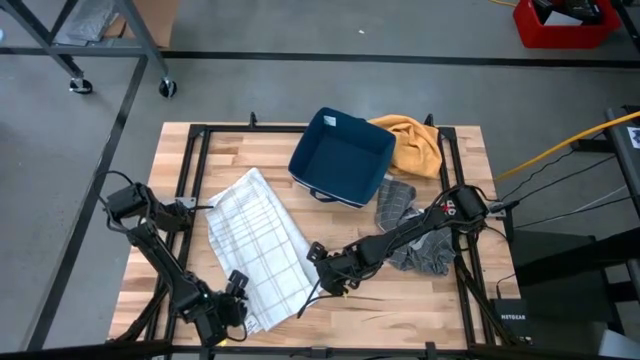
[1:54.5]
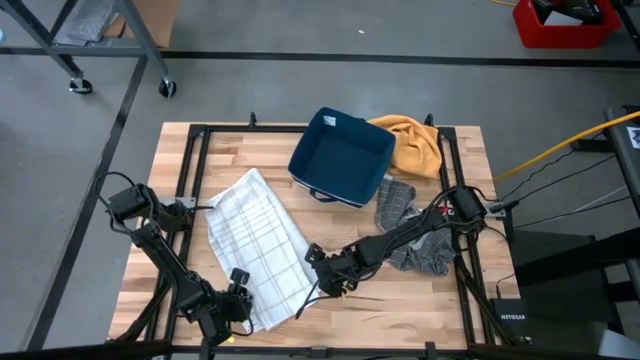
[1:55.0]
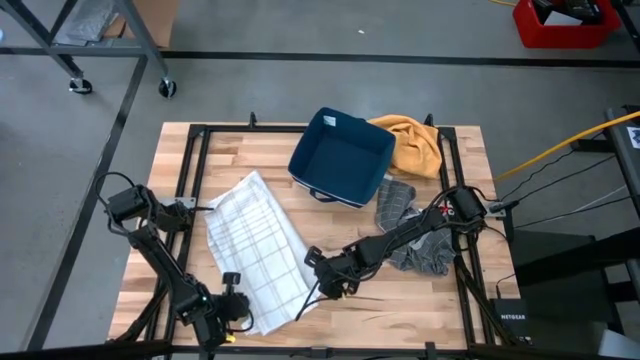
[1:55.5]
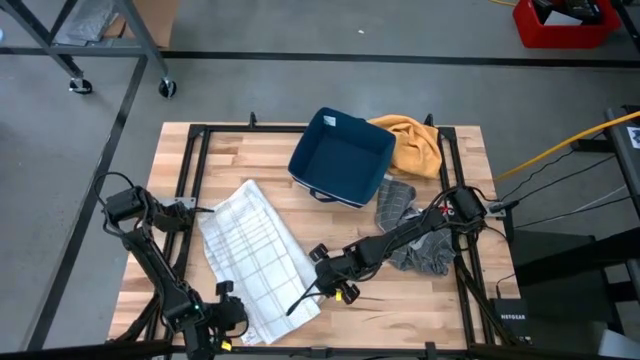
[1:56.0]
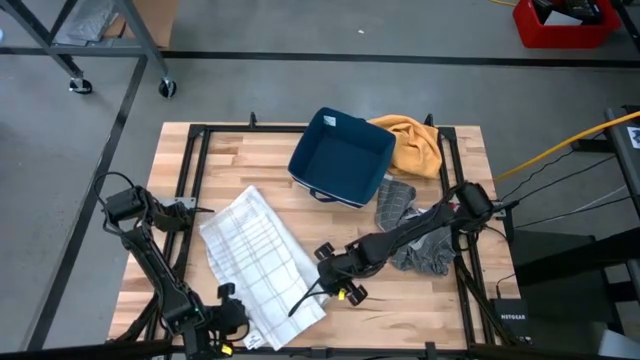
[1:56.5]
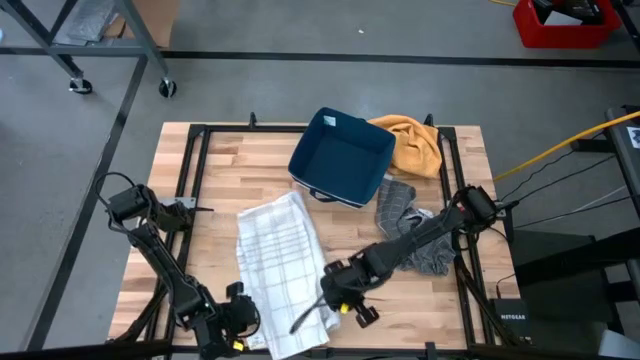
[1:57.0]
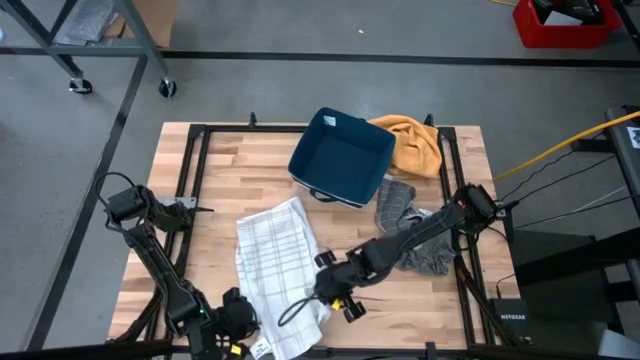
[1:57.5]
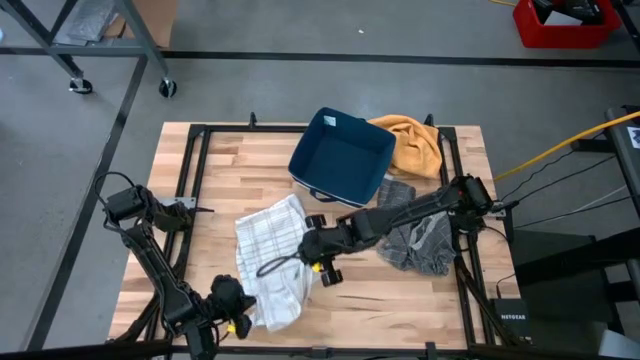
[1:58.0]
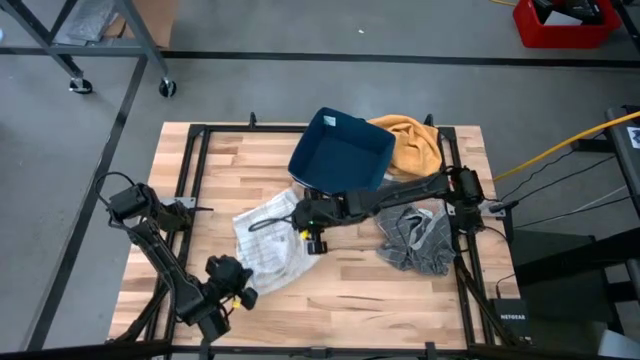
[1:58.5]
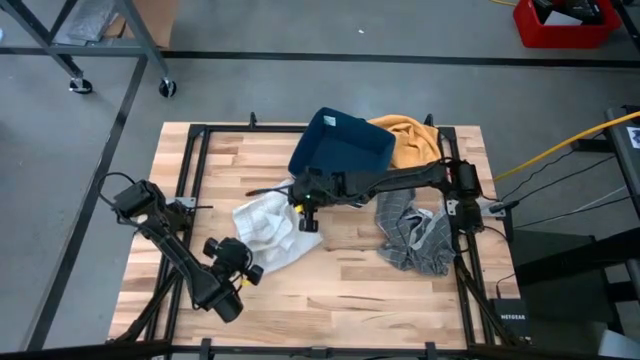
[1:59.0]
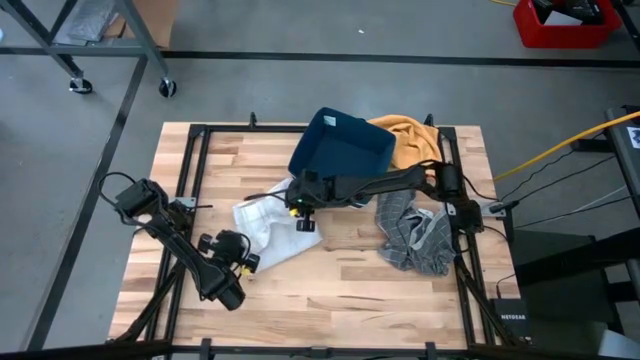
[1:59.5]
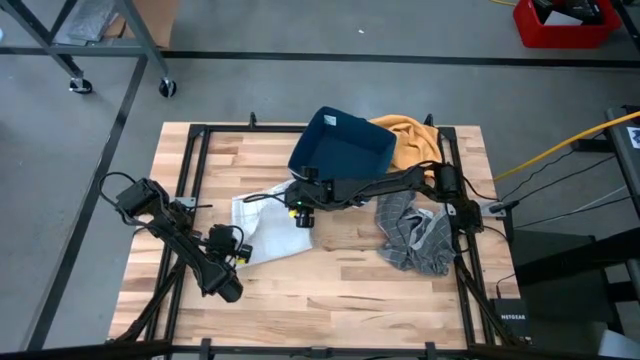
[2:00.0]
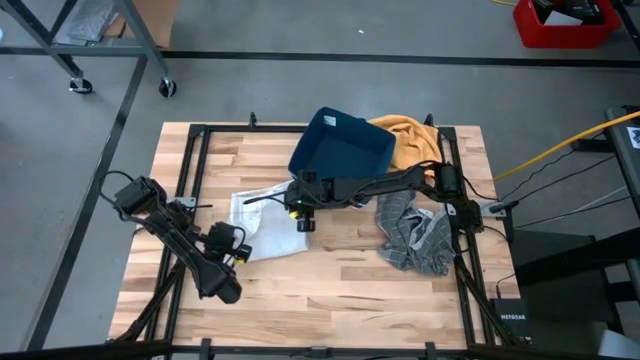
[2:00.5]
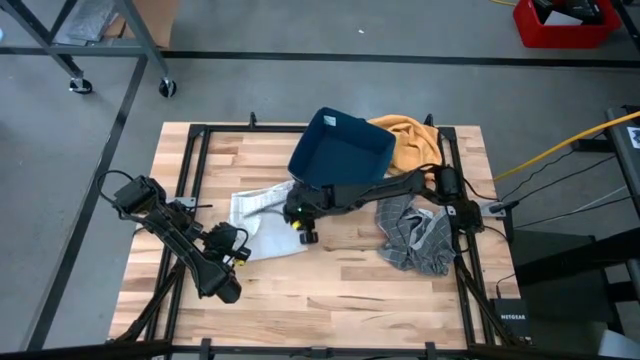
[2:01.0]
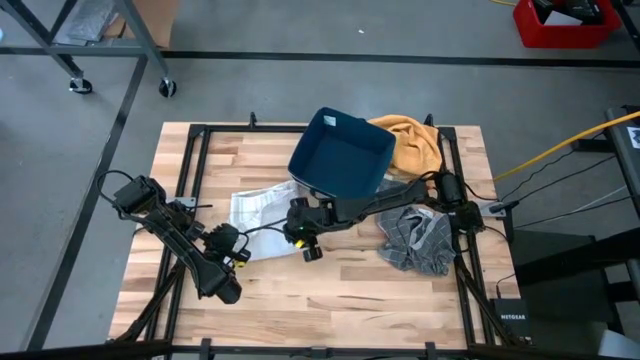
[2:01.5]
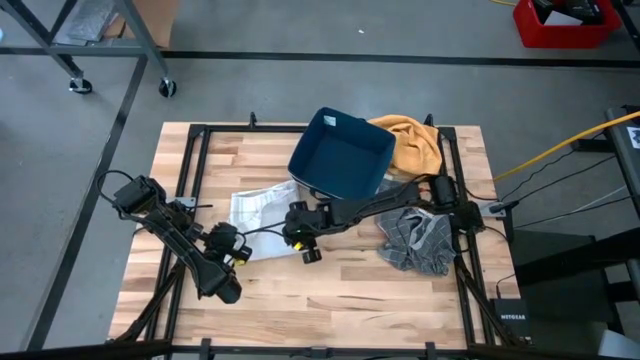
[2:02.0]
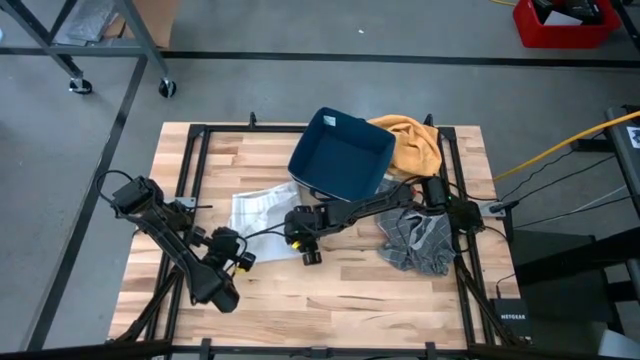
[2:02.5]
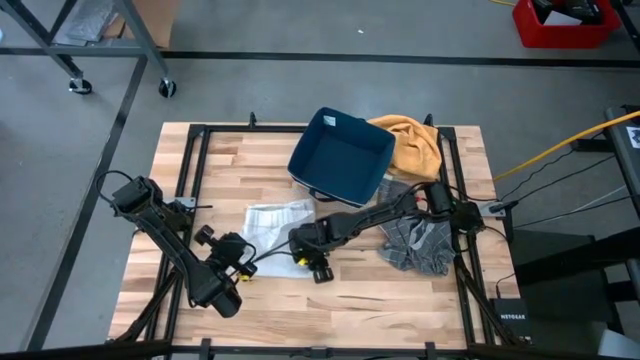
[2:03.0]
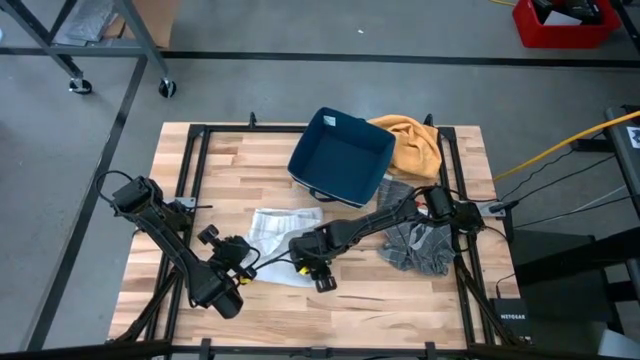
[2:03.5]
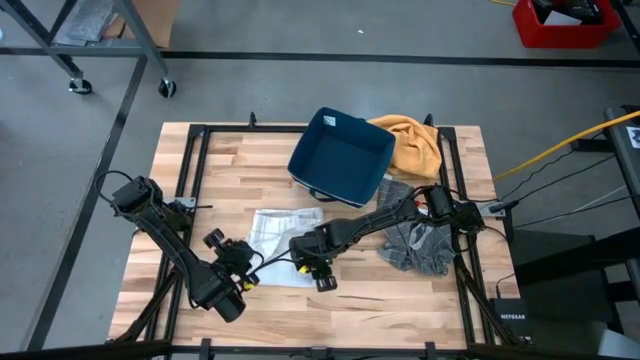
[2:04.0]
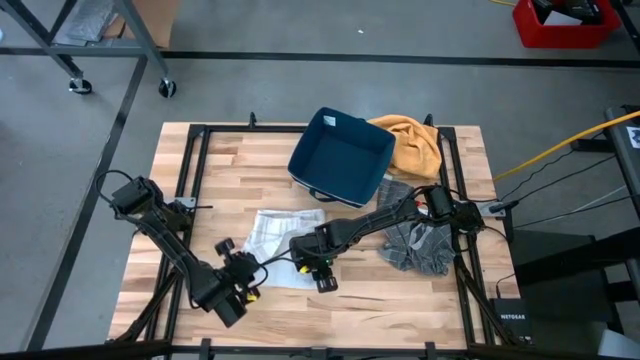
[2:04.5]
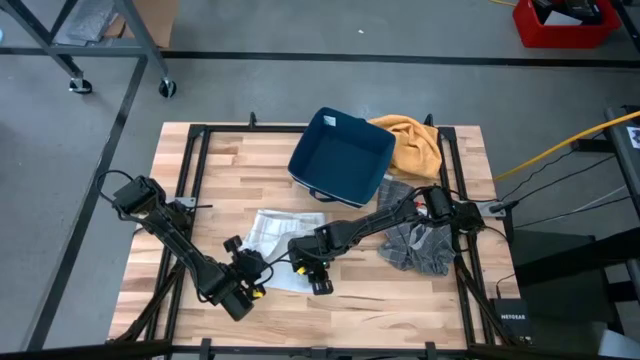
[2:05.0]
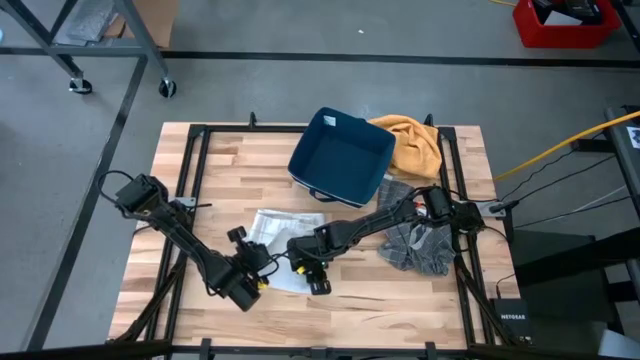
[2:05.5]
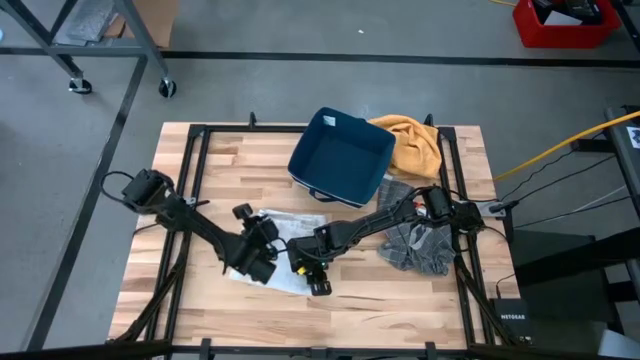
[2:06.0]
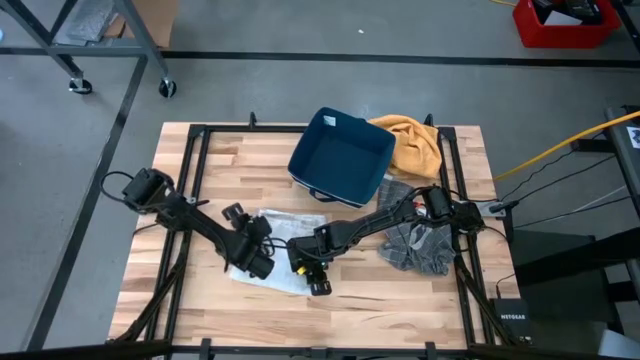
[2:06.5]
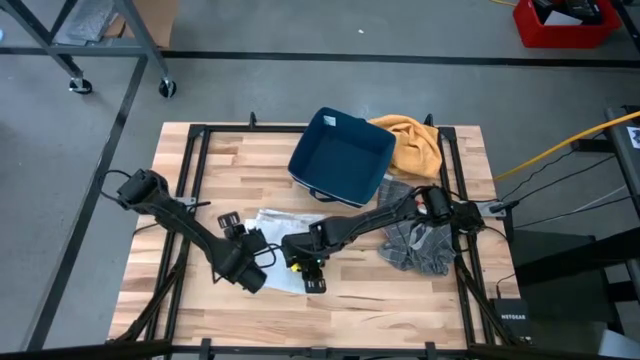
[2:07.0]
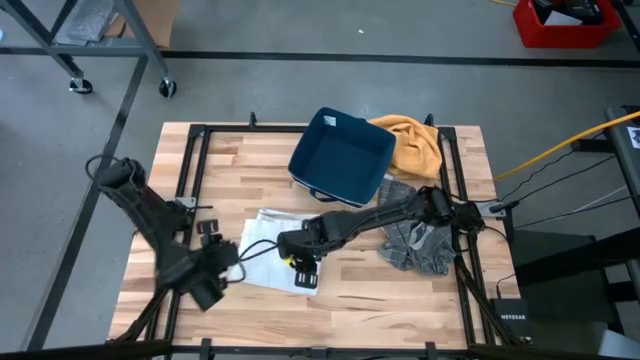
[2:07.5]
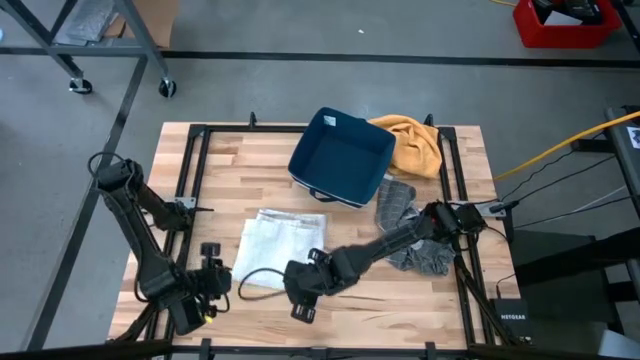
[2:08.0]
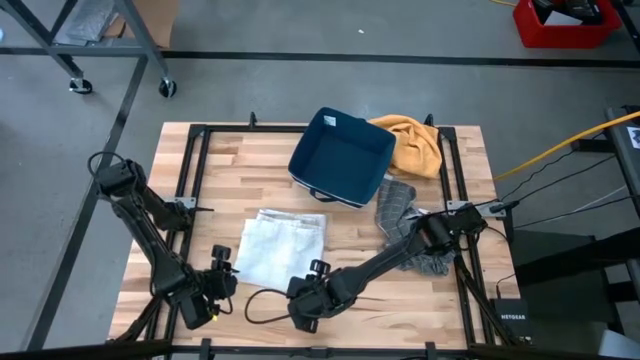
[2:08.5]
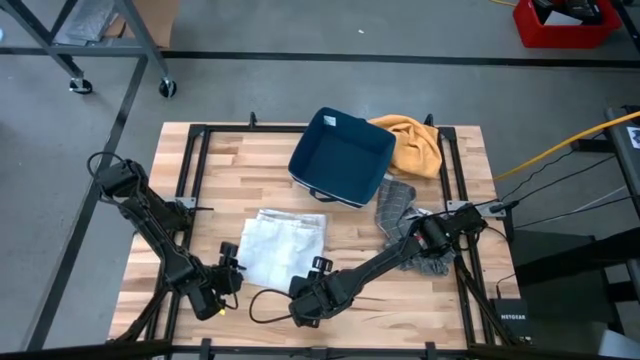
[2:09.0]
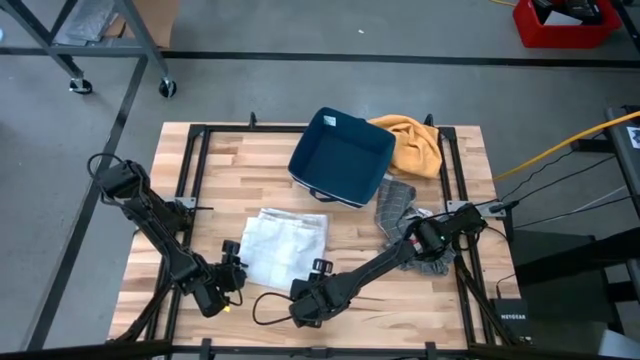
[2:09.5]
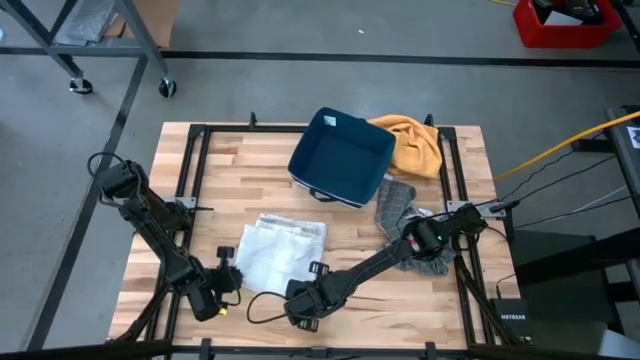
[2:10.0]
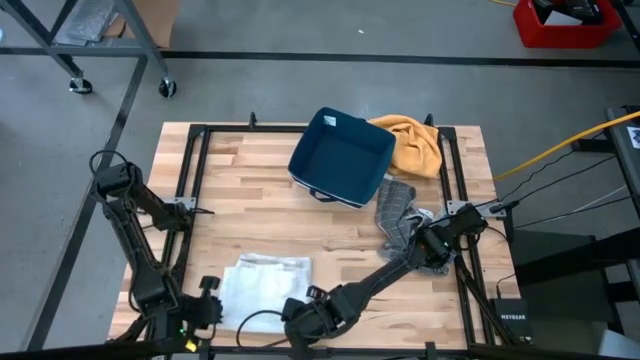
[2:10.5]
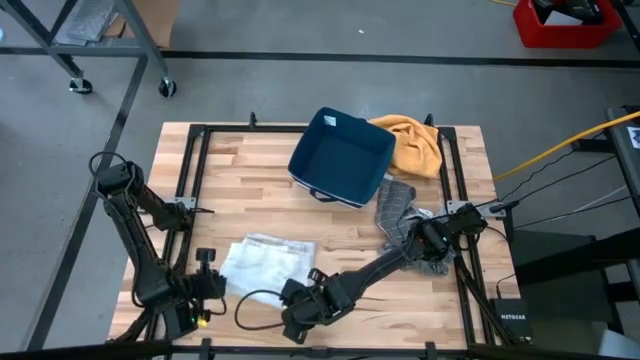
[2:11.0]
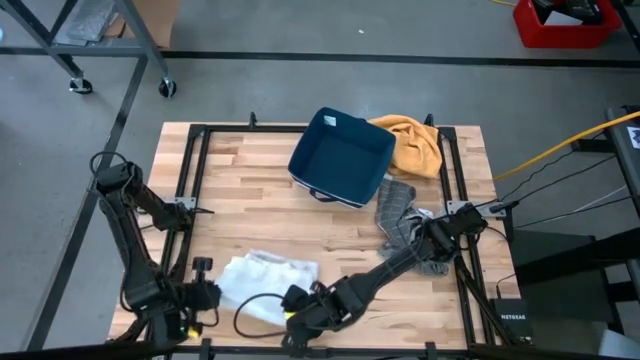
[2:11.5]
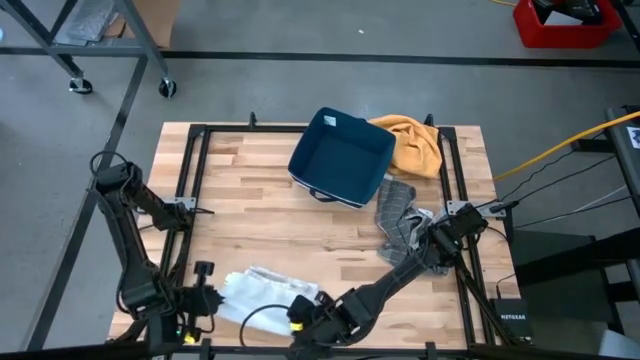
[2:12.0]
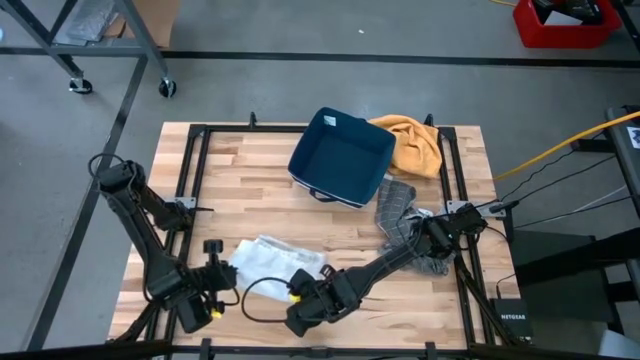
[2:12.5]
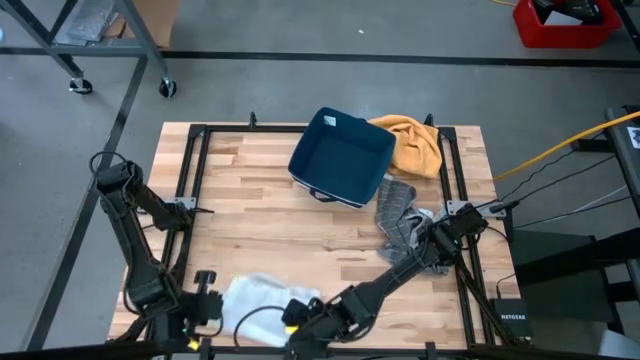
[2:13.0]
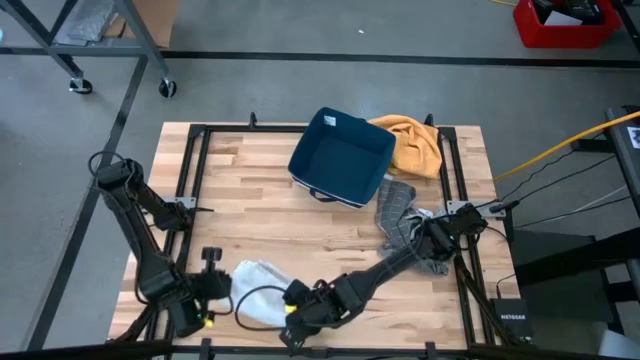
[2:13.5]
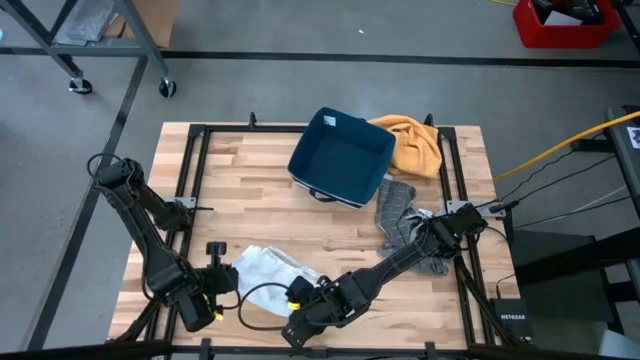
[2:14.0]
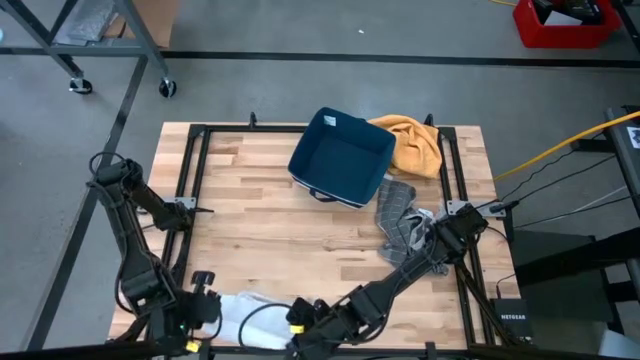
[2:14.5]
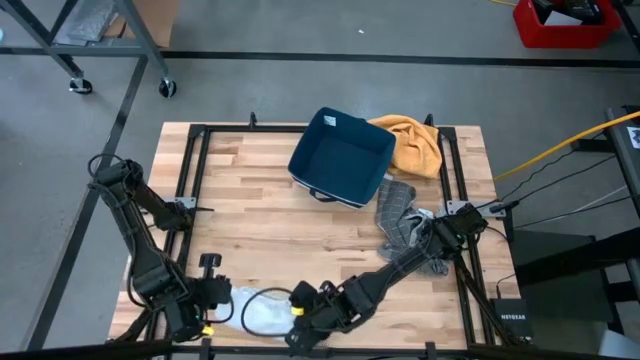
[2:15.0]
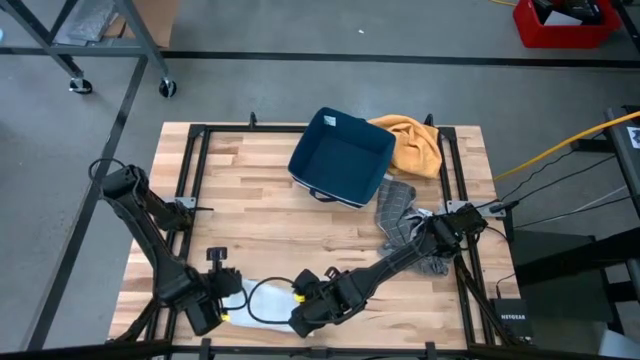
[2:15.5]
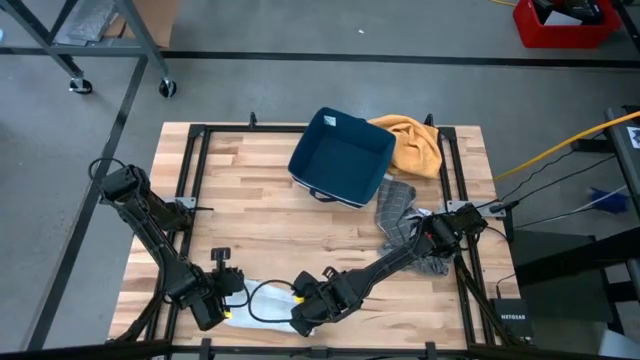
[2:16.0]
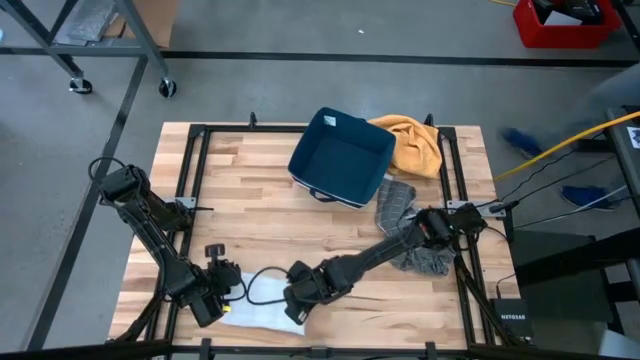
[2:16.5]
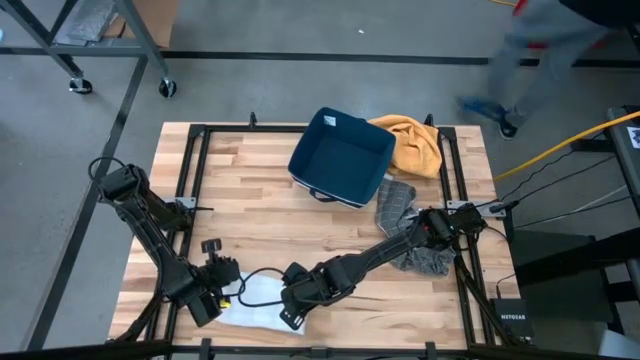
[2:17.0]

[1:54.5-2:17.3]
Task: Fold towel
Fold the white patterned towel
